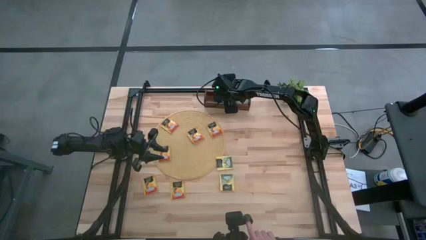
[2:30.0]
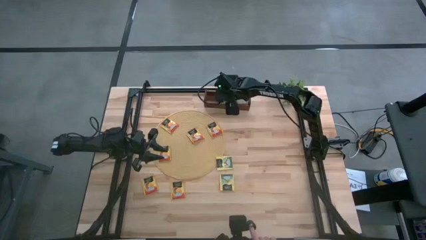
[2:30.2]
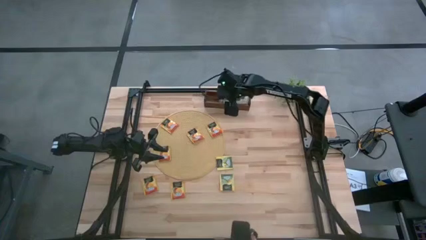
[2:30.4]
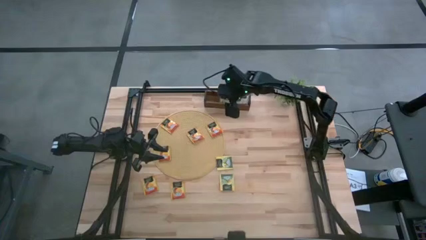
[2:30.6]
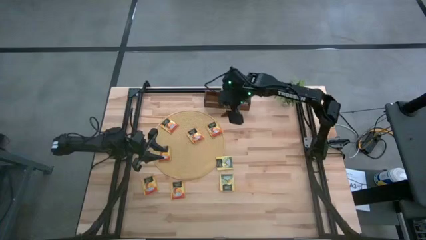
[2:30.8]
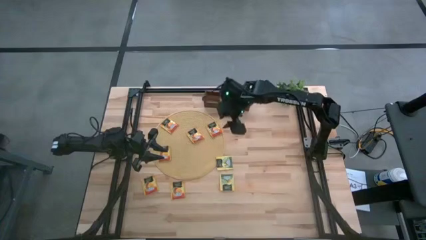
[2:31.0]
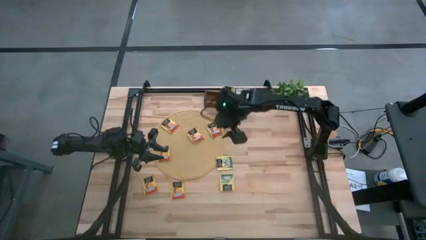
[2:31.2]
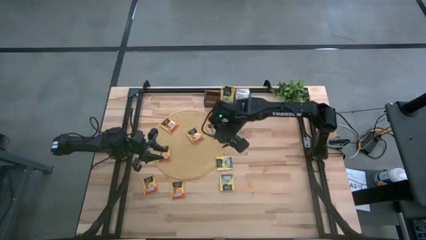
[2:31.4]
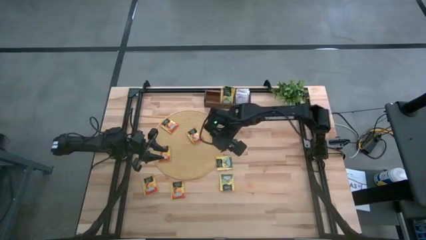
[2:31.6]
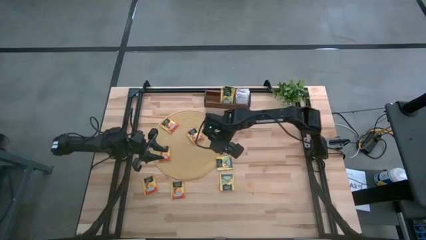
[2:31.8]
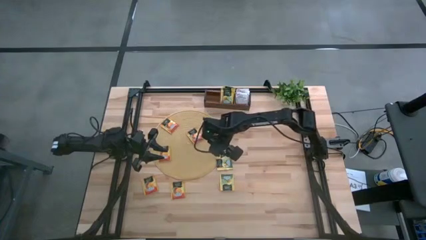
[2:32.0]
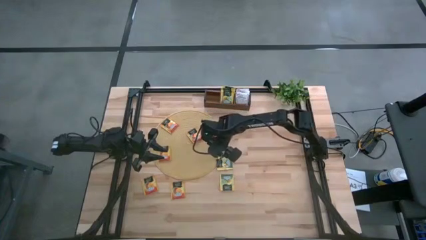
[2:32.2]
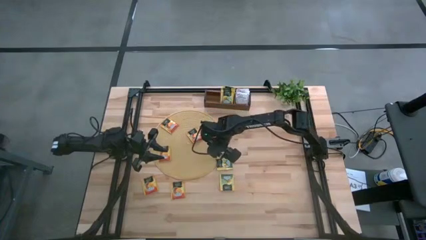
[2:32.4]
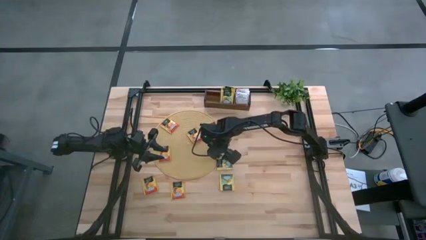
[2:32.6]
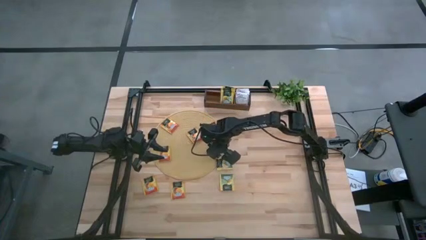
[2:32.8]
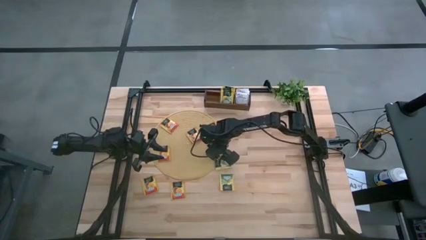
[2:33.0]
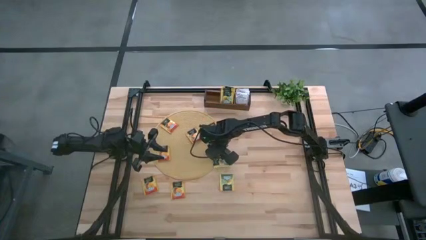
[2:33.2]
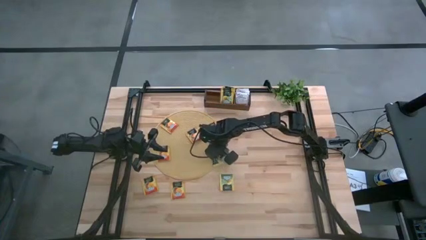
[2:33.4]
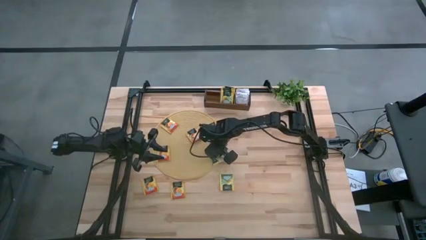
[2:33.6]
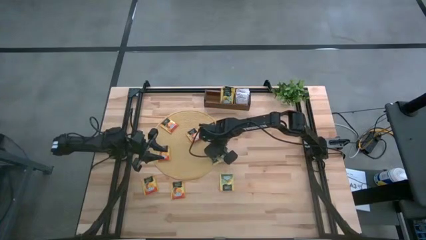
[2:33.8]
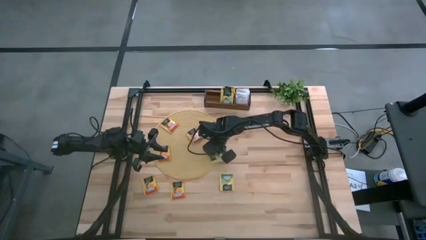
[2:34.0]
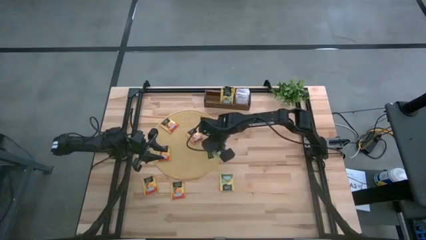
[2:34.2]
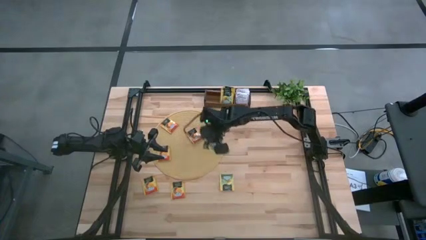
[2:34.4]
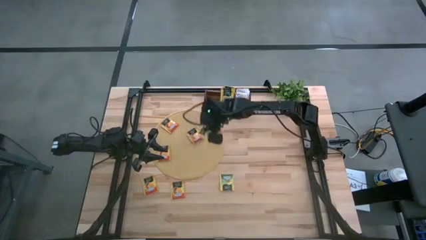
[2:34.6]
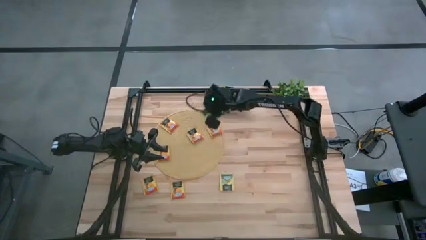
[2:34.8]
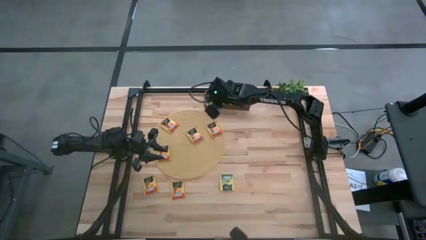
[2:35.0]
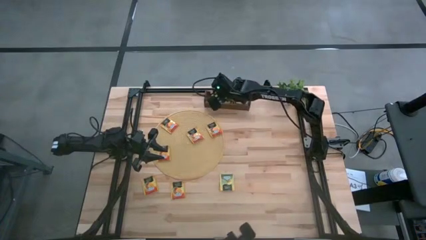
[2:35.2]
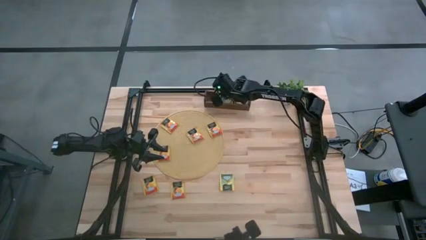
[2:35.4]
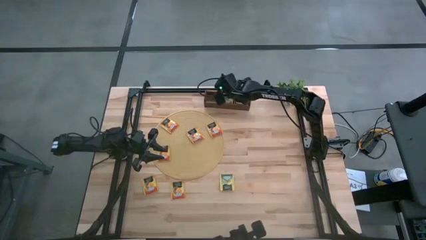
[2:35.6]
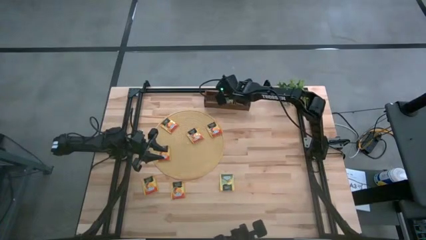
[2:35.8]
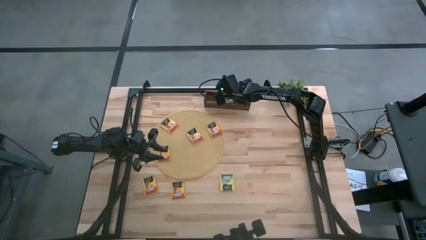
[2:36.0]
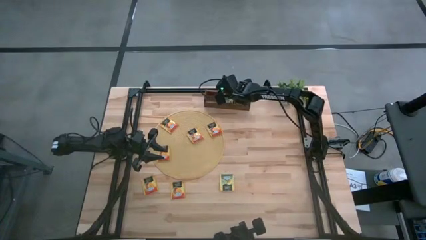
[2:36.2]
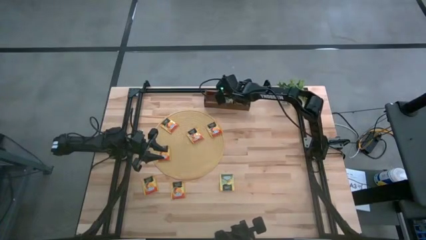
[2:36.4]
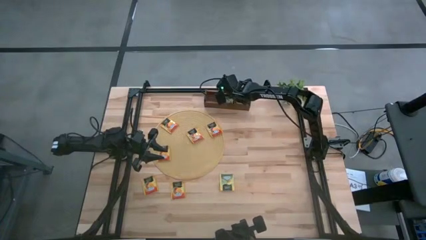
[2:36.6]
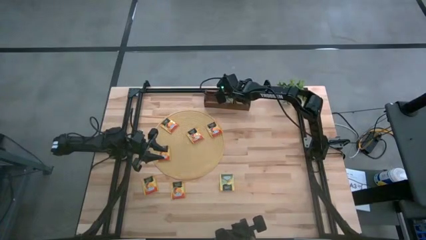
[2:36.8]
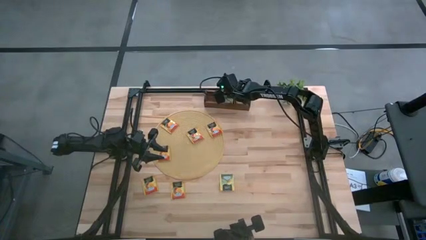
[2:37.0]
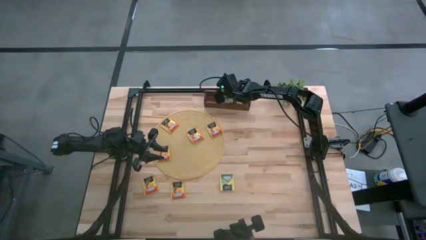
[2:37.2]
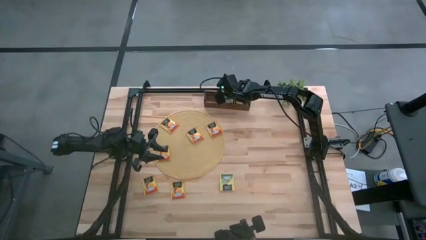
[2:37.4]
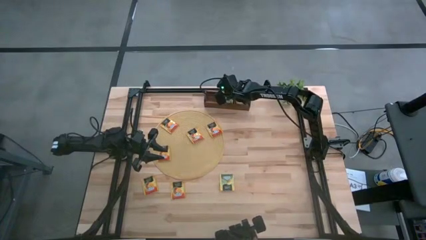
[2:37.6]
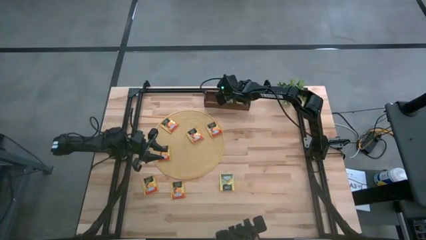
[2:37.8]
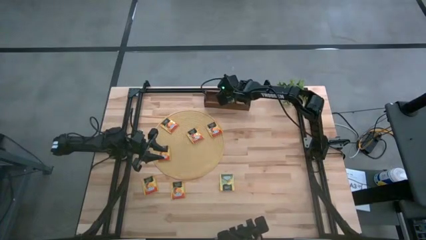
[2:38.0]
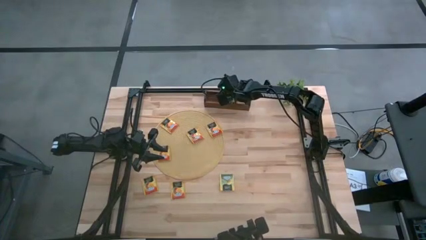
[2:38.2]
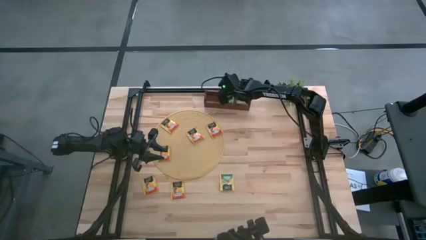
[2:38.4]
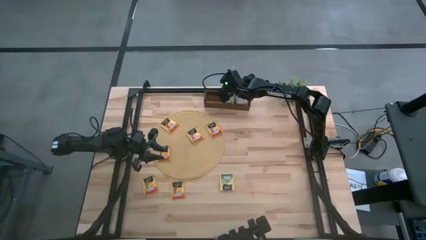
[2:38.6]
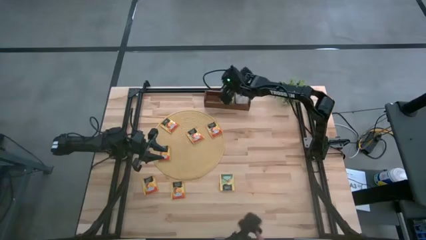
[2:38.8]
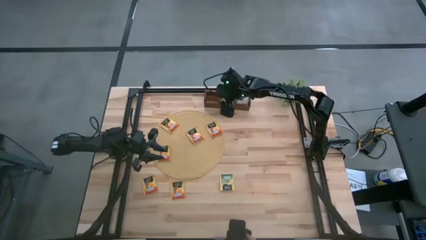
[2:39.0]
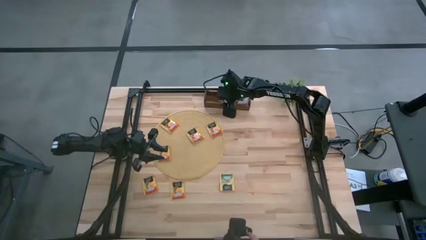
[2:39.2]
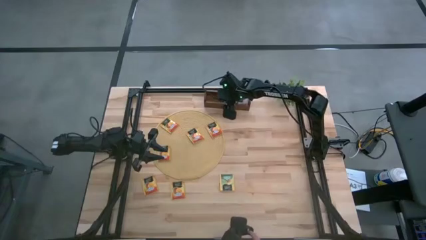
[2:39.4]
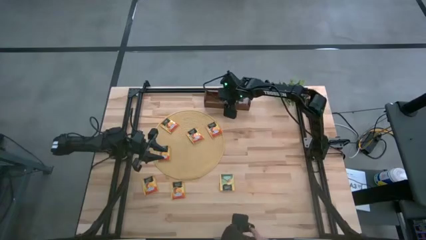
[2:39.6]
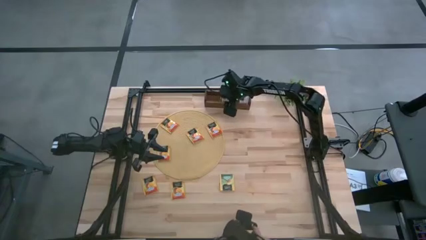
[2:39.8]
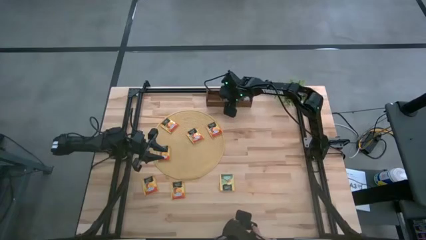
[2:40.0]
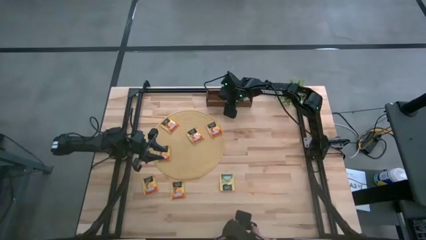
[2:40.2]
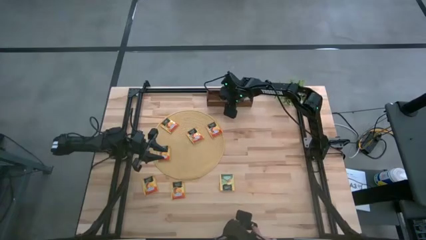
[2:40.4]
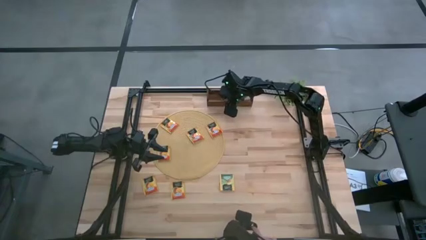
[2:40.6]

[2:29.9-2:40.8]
Task: Pick & Place Tea
Put the top yellow tea bag into the middle section of the wooden organizer

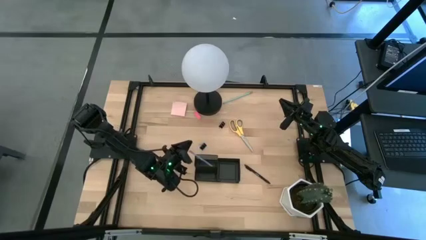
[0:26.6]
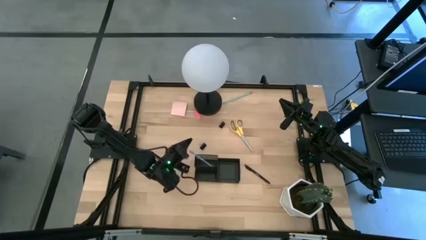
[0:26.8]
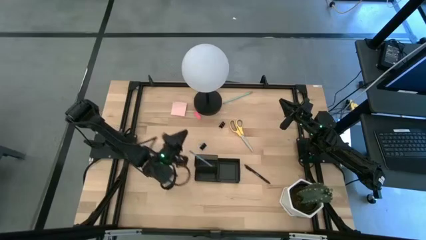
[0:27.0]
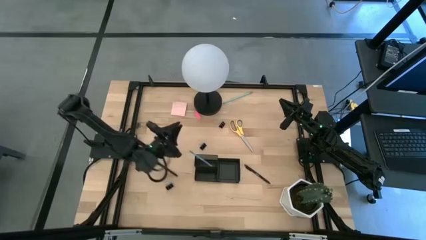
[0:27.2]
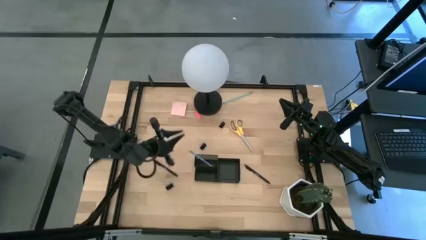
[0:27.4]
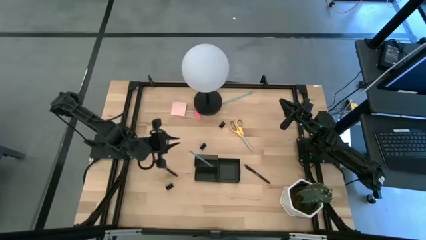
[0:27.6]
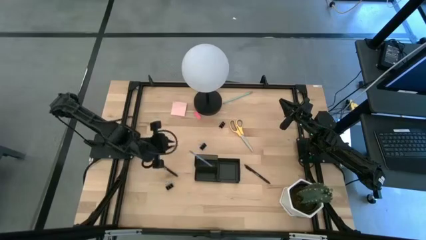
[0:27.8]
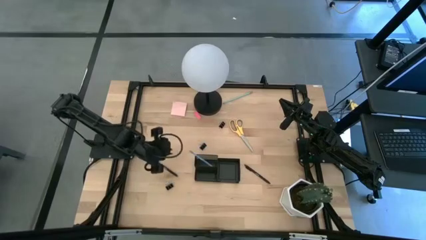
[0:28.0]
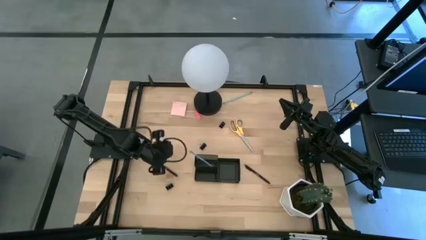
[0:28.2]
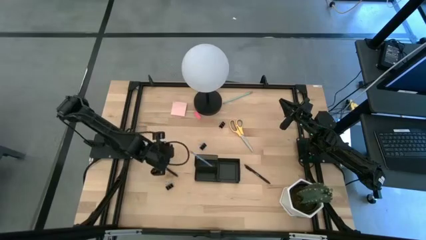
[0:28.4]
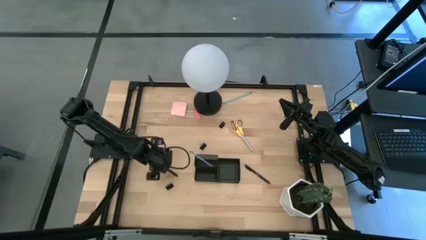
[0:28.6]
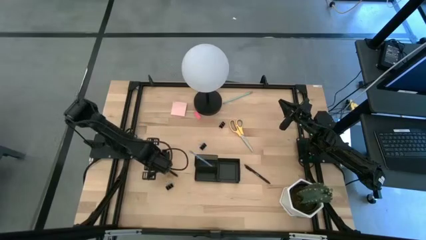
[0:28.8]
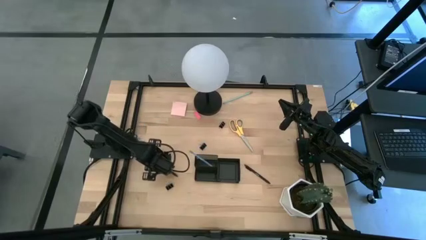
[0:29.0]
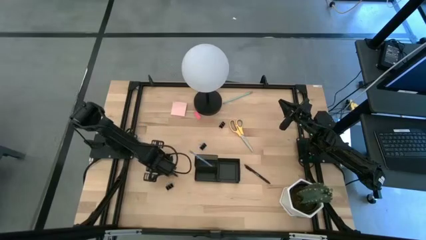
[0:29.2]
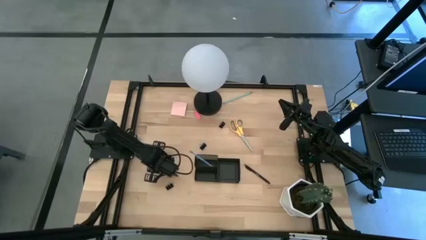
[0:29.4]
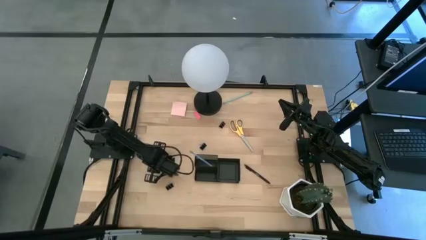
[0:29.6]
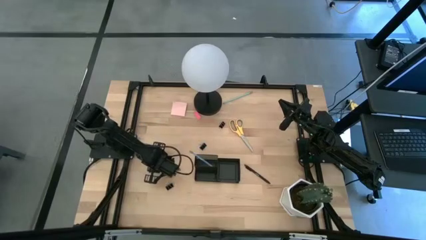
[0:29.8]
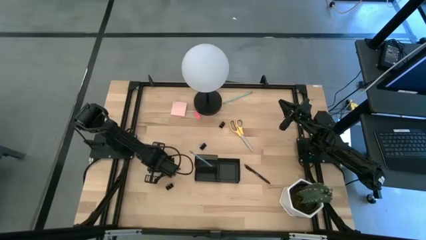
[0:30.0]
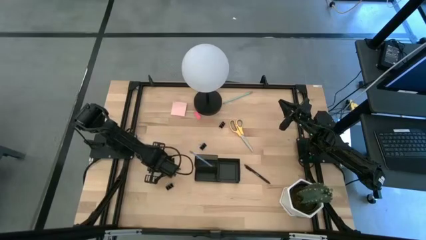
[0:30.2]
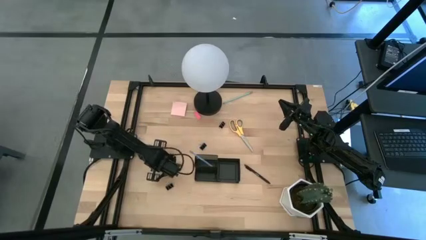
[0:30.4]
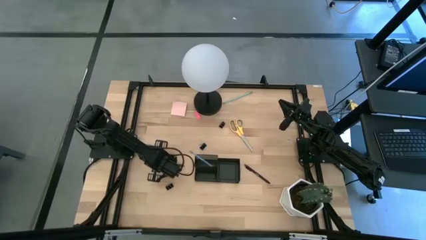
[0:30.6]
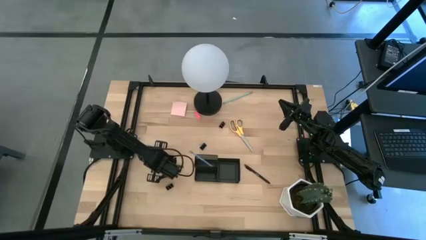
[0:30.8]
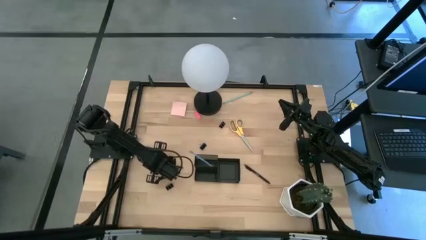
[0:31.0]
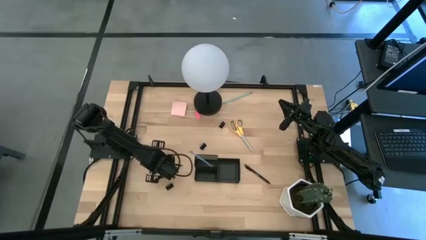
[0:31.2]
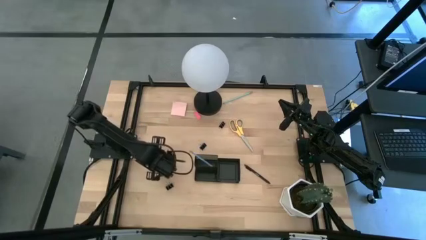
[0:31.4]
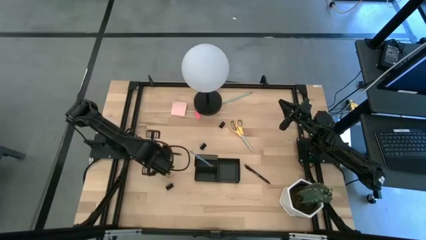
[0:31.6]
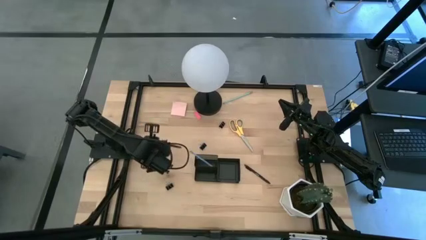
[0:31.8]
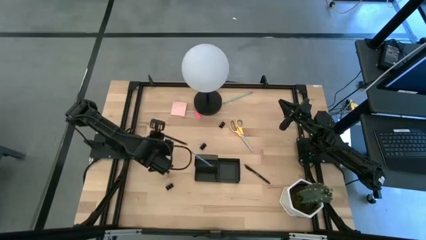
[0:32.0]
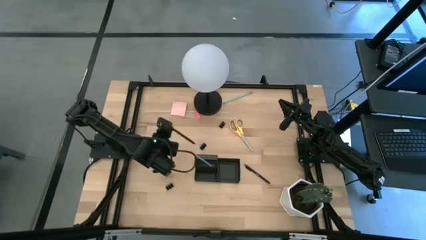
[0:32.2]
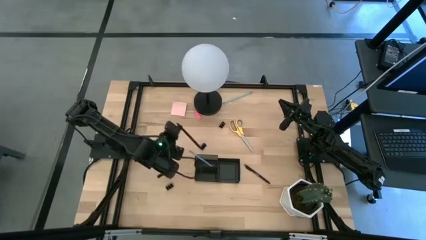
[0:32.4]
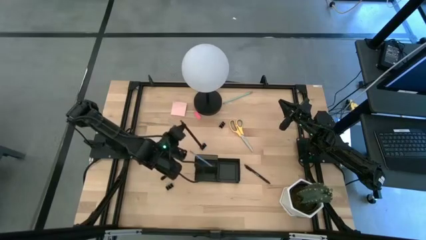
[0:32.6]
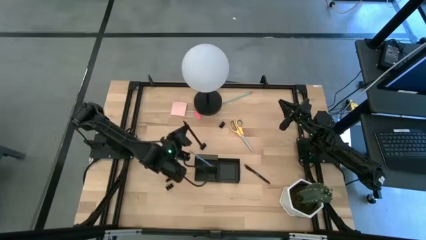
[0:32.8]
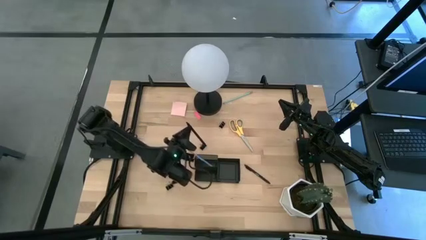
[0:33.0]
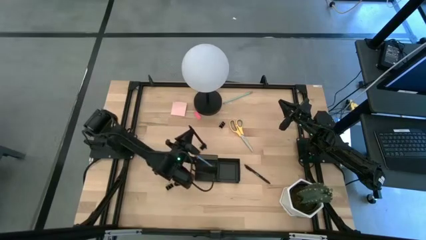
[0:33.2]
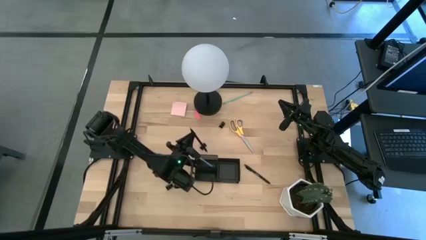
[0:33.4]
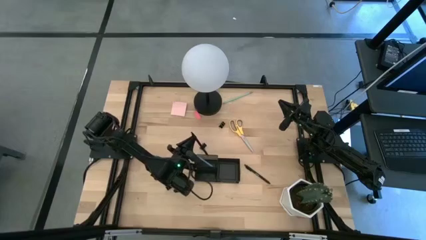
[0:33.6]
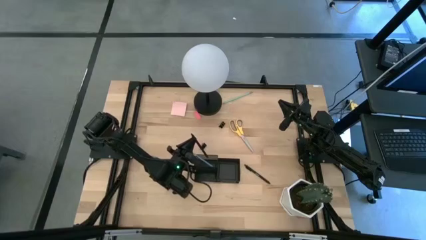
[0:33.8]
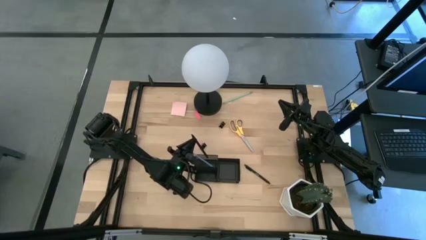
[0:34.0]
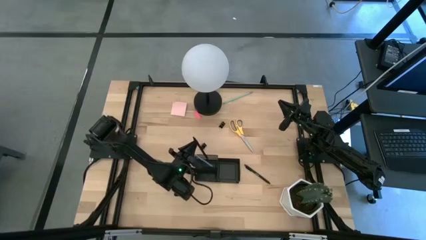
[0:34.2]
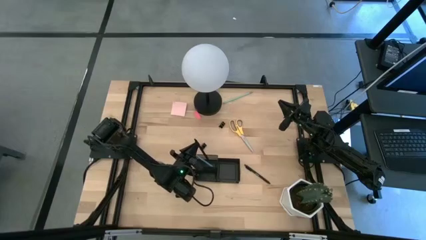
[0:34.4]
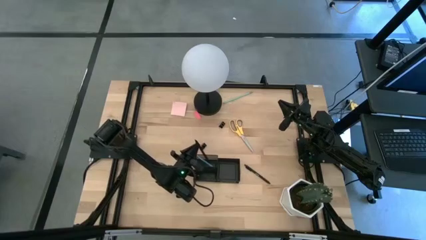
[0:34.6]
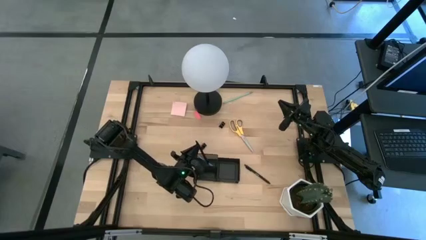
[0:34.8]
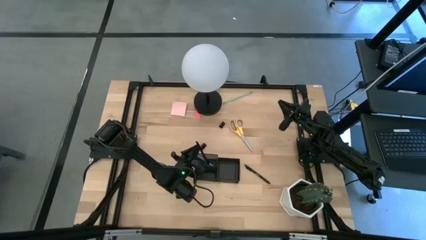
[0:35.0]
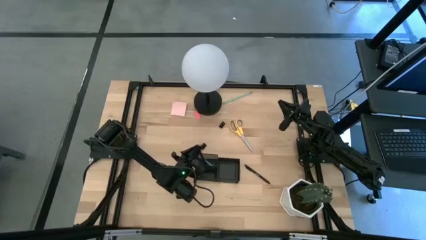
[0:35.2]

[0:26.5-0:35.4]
Task: Pick and place office supplies into organizer
Put the left black pen into the black desk organizer
